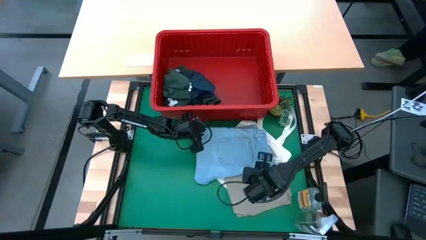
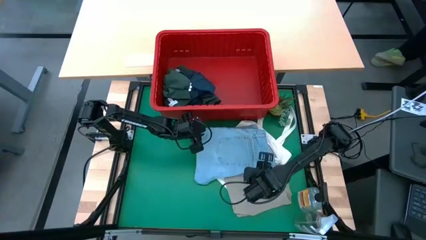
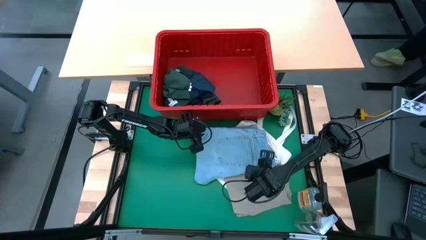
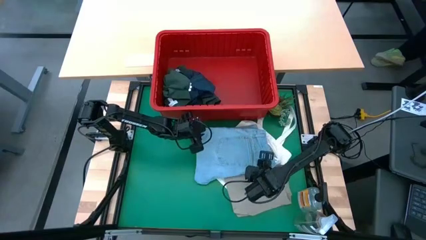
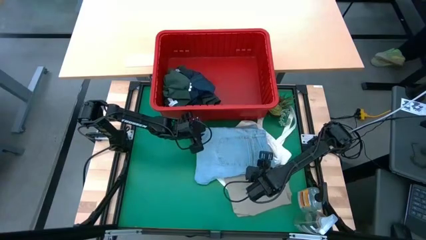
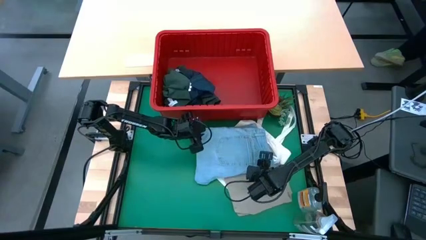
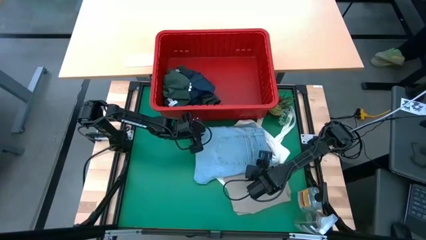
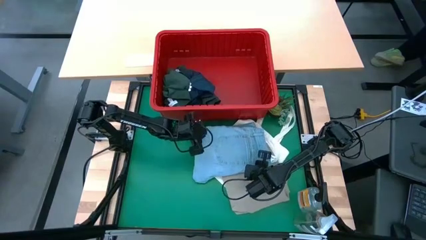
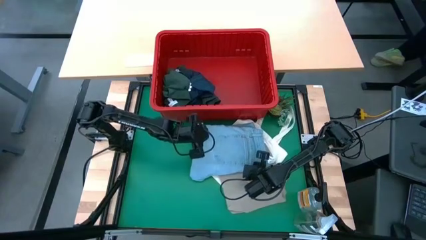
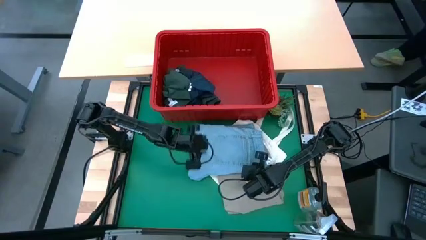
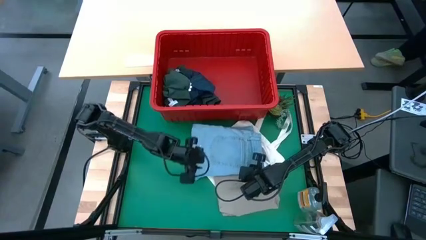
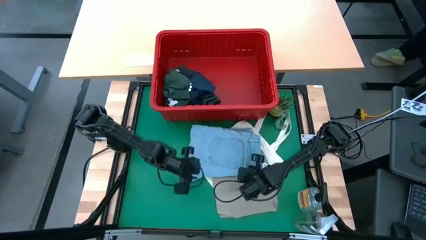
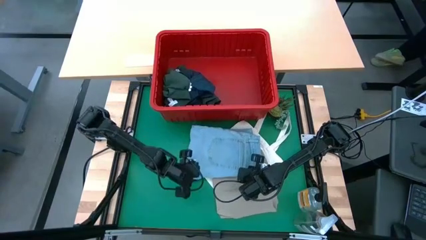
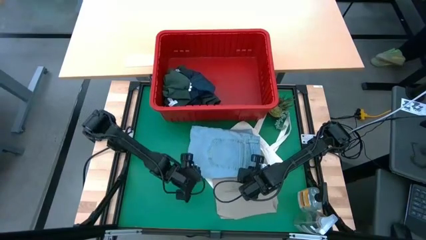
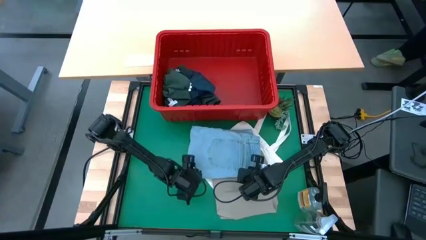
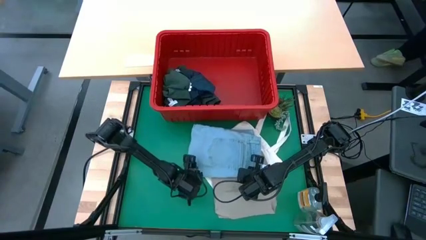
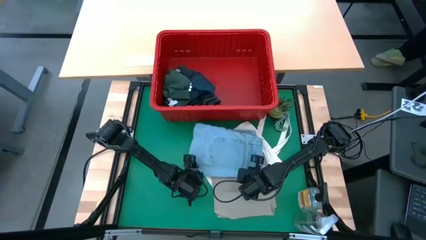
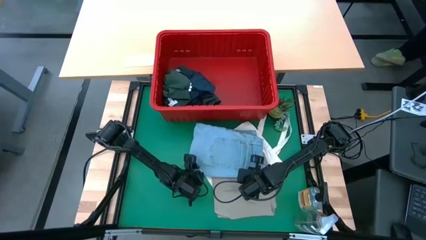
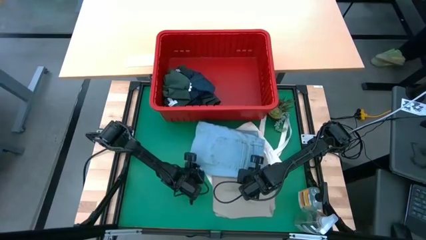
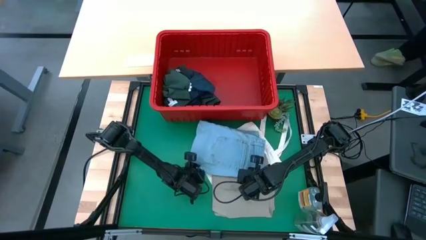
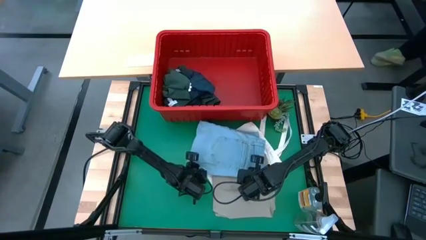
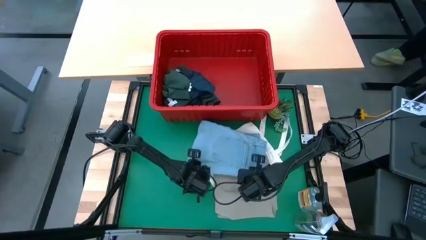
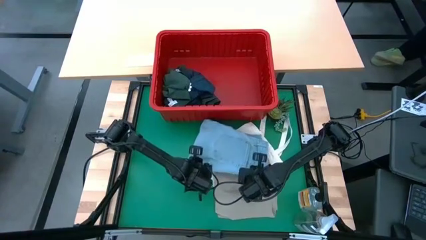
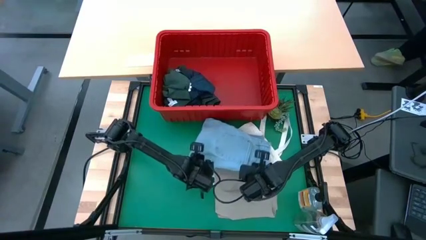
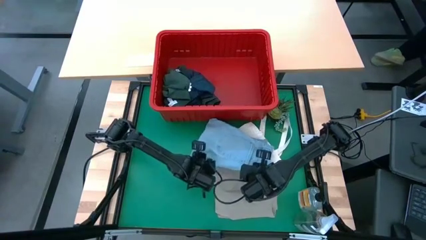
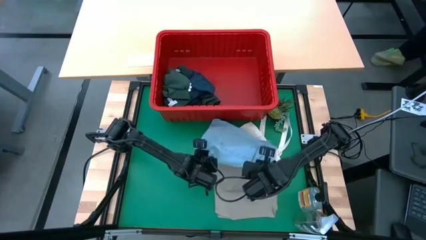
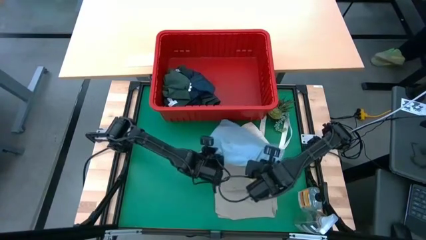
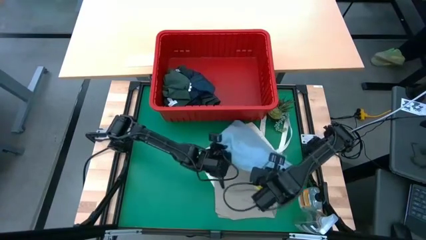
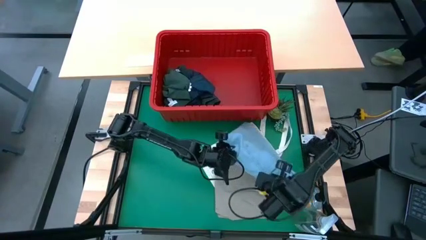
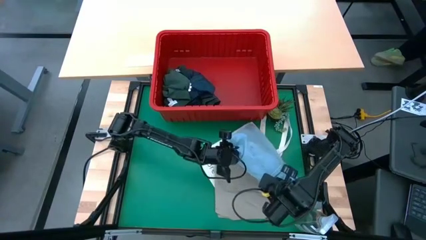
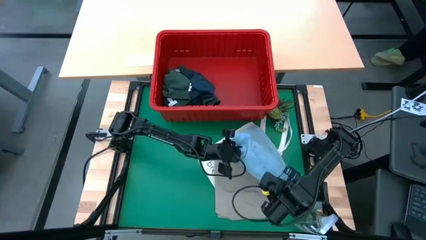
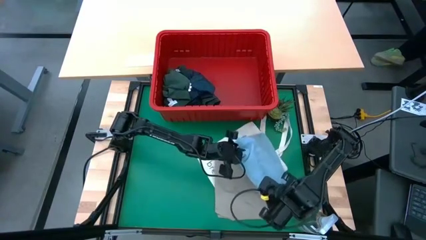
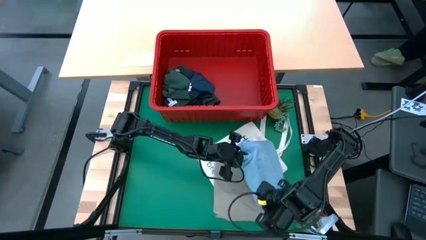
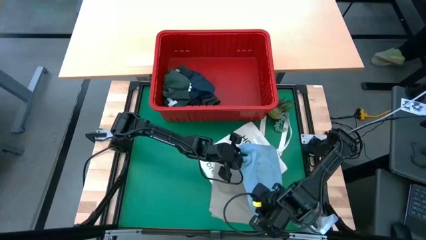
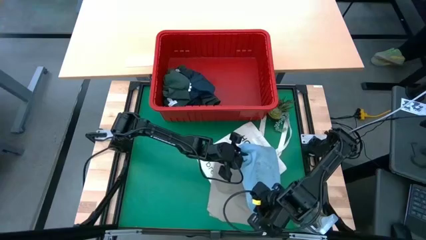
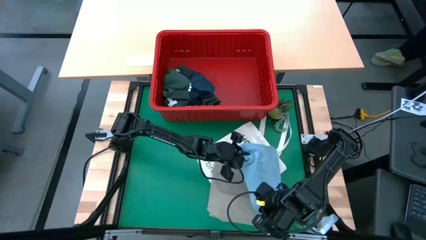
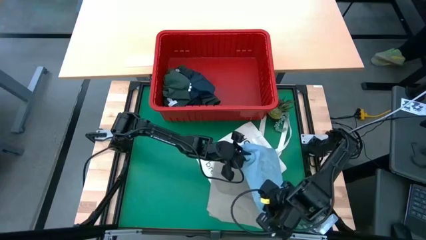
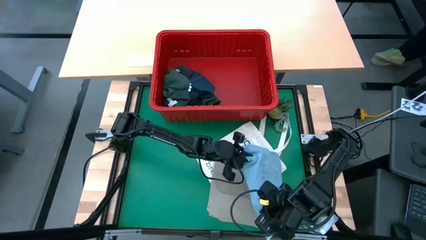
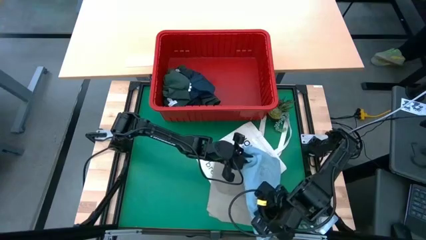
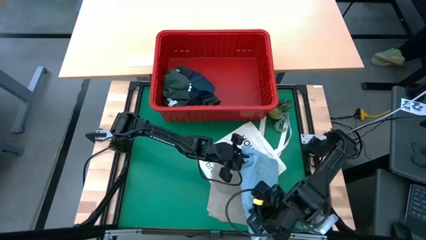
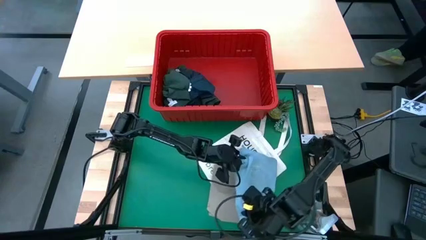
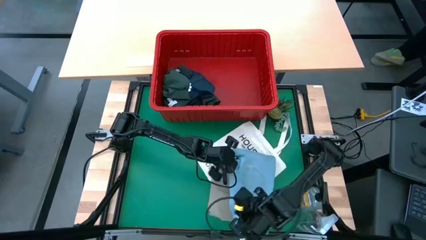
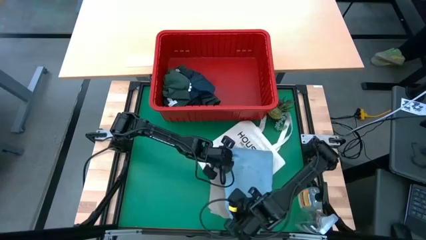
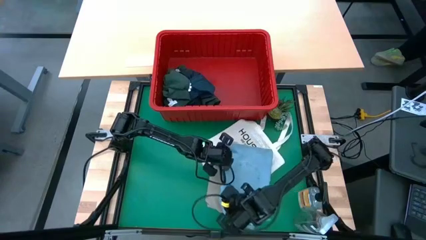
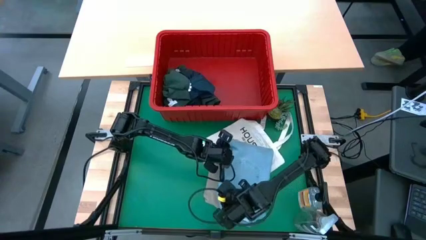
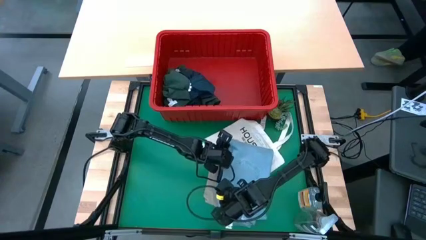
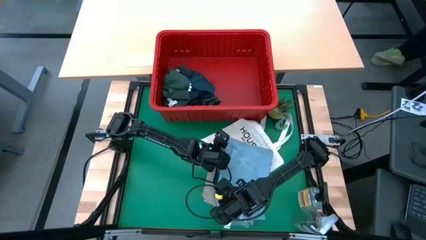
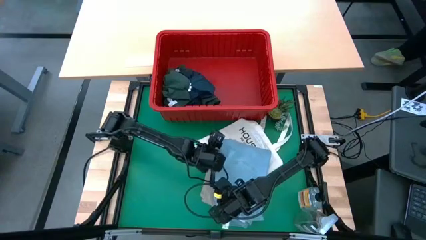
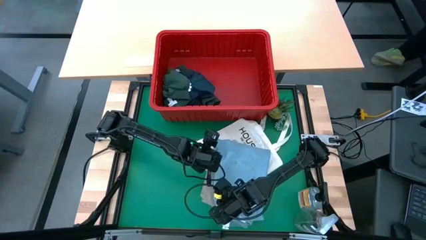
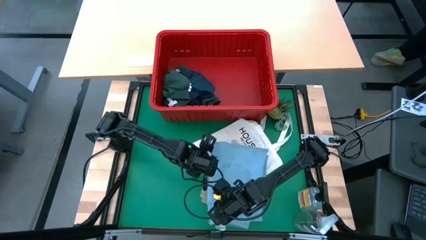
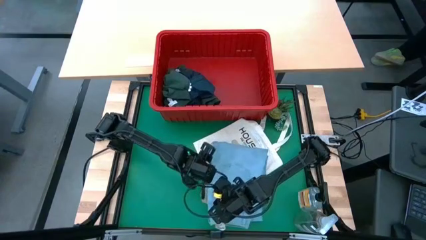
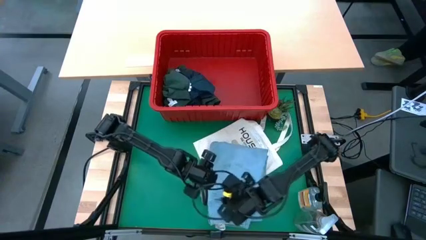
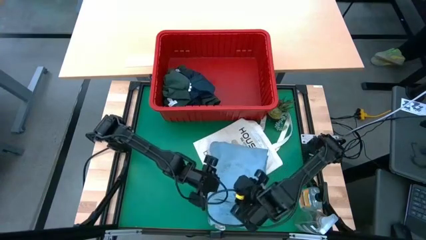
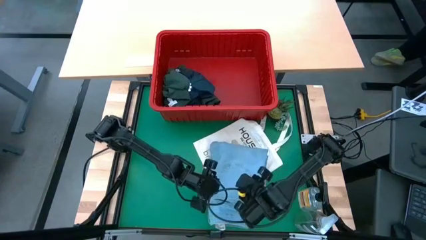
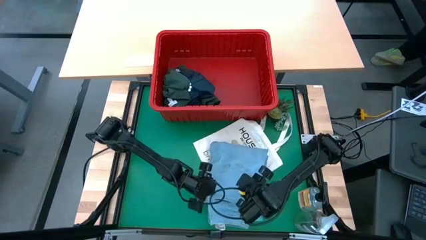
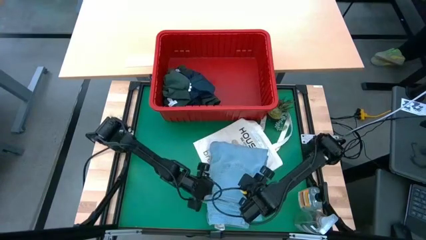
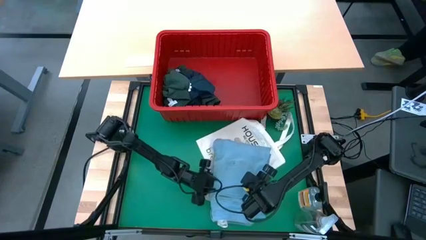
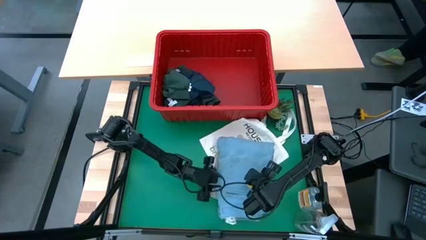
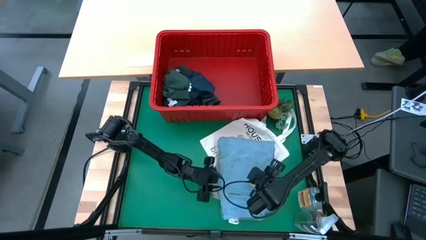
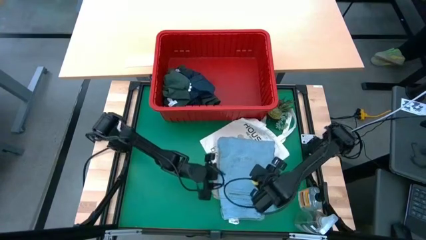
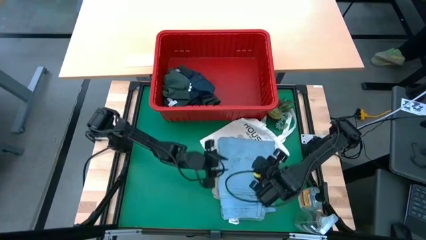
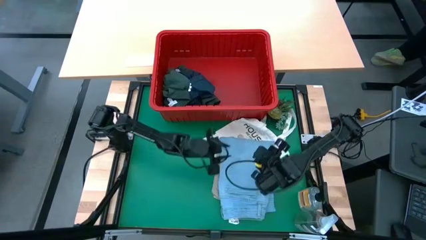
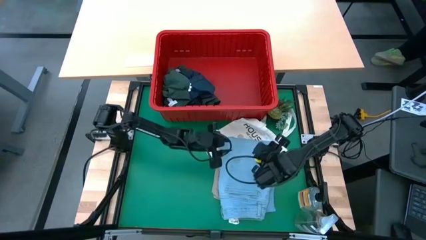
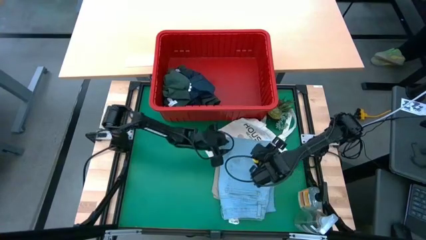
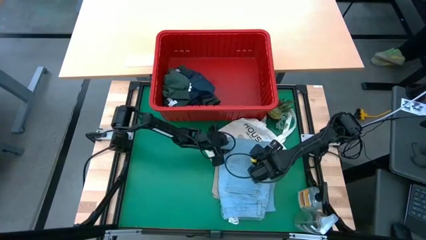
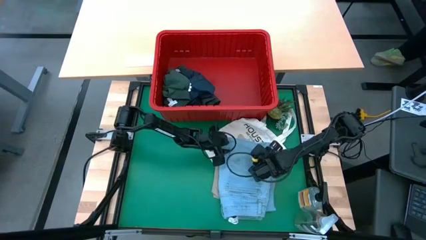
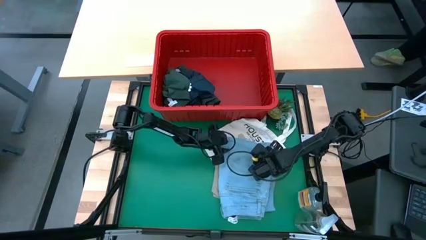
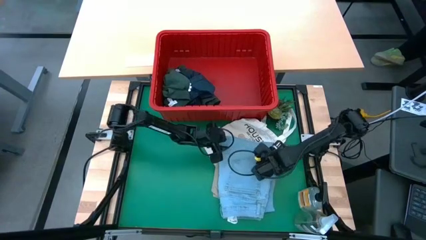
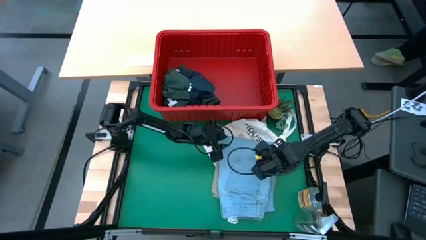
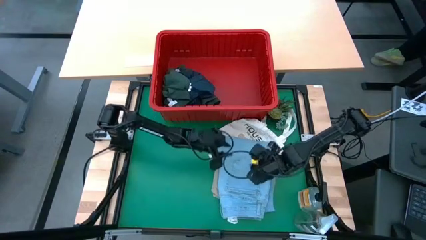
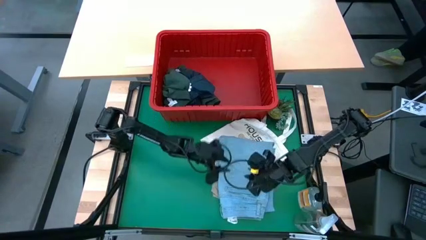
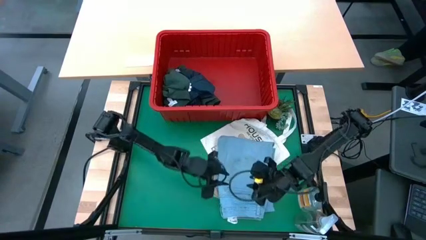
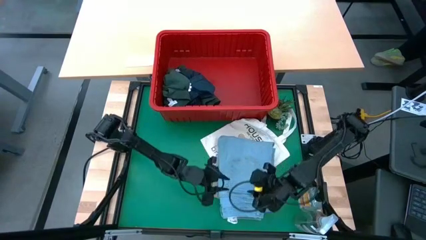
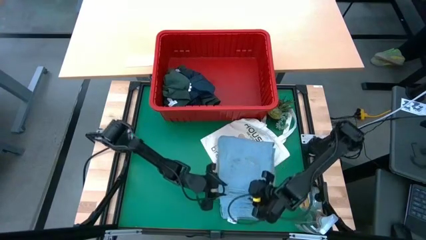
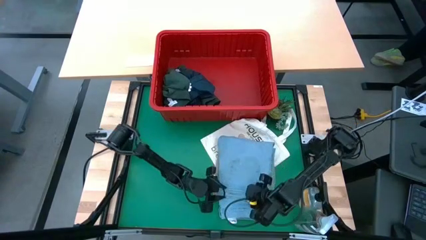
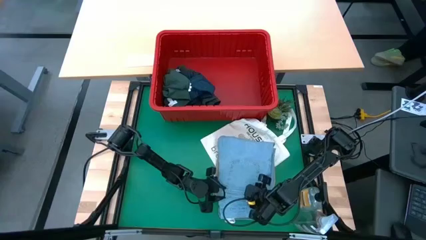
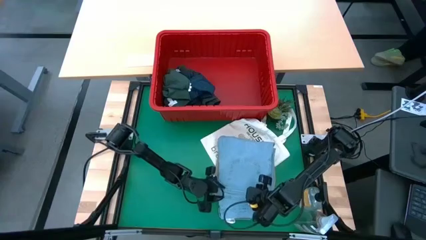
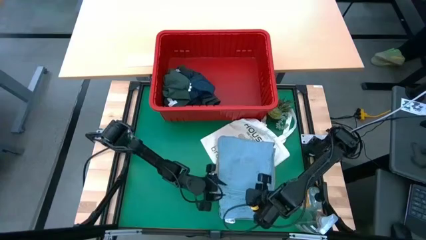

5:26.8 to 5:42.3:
Task: Fold Laundry from Bin
Stack the light blue jeans on top of the brown shorts
